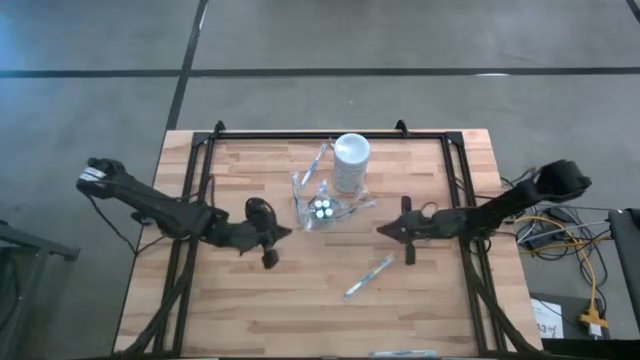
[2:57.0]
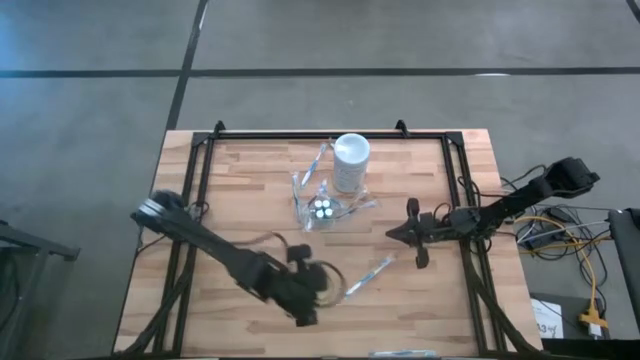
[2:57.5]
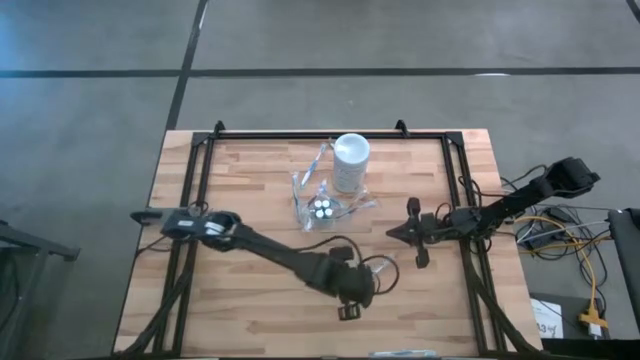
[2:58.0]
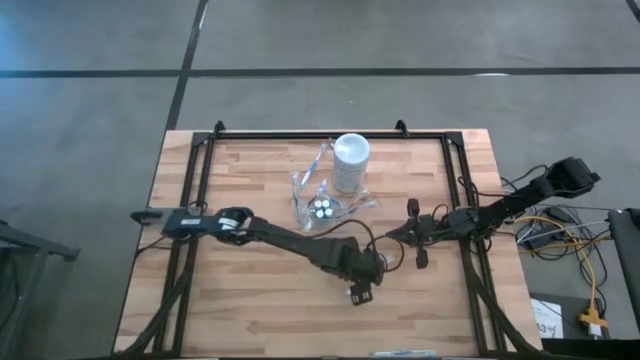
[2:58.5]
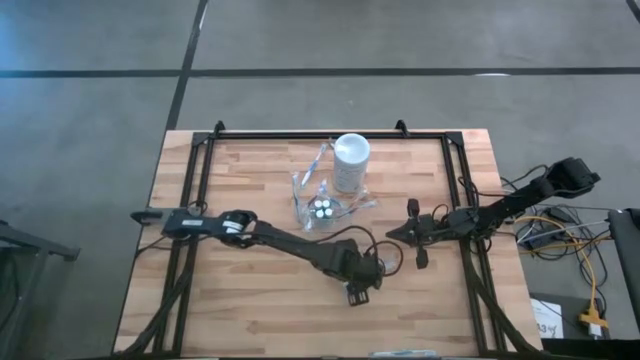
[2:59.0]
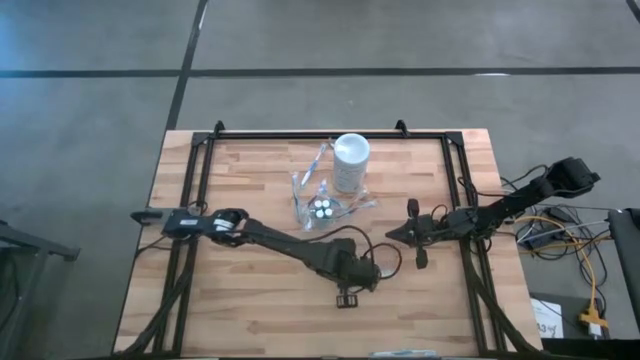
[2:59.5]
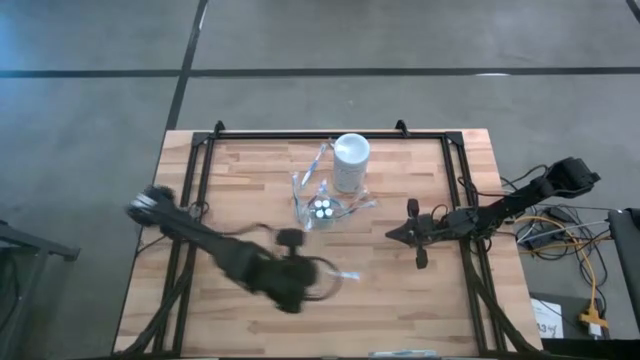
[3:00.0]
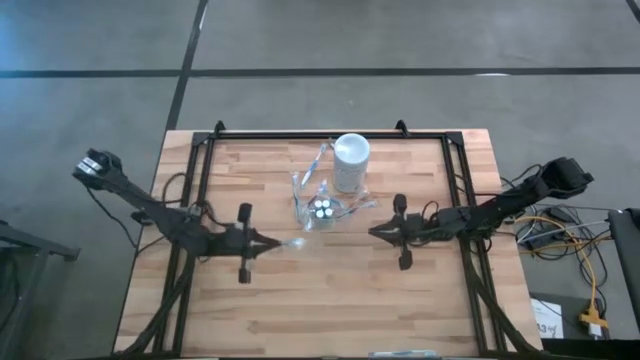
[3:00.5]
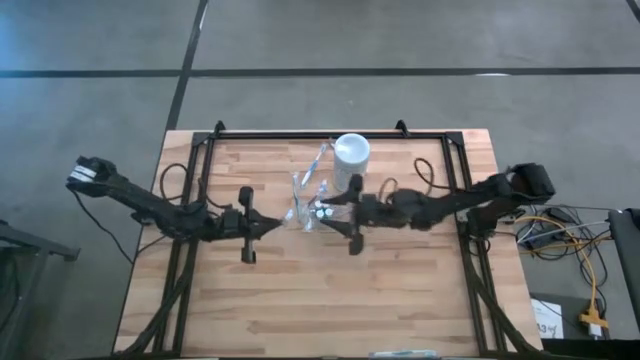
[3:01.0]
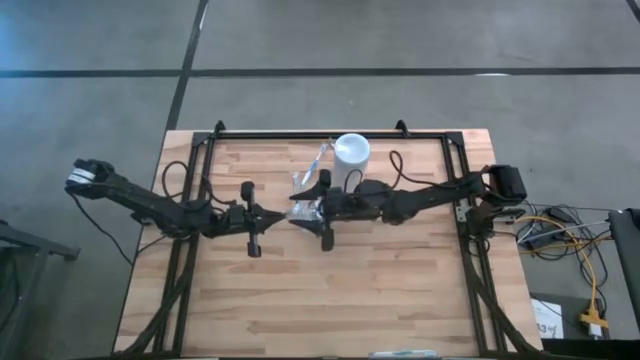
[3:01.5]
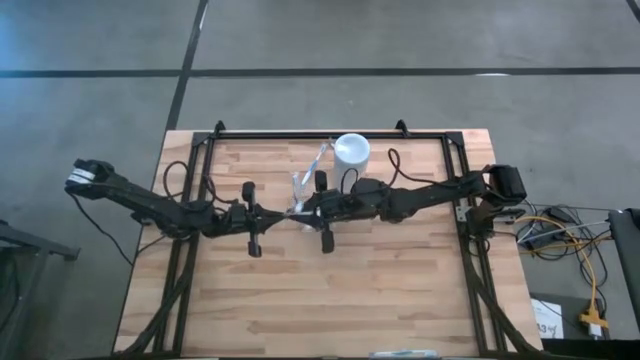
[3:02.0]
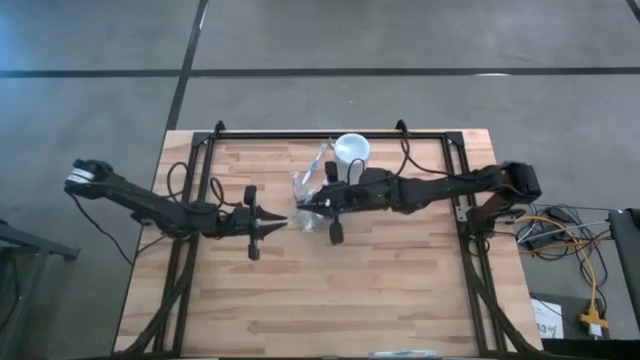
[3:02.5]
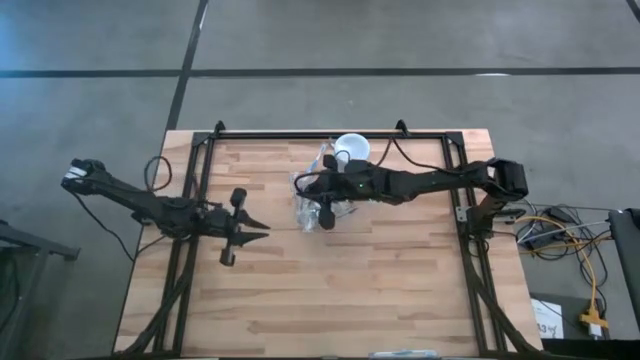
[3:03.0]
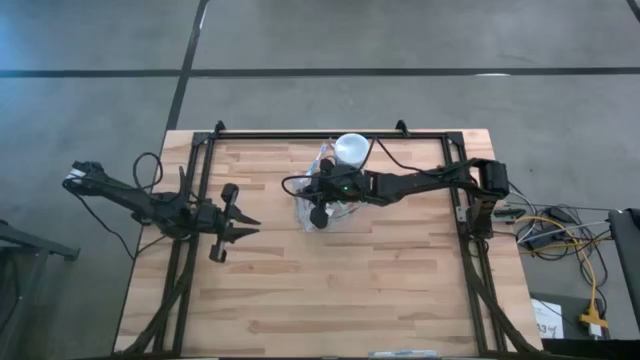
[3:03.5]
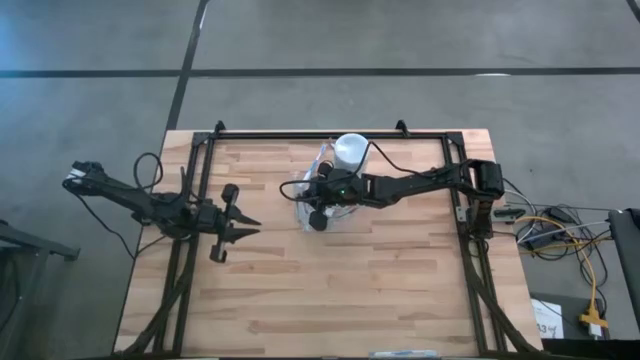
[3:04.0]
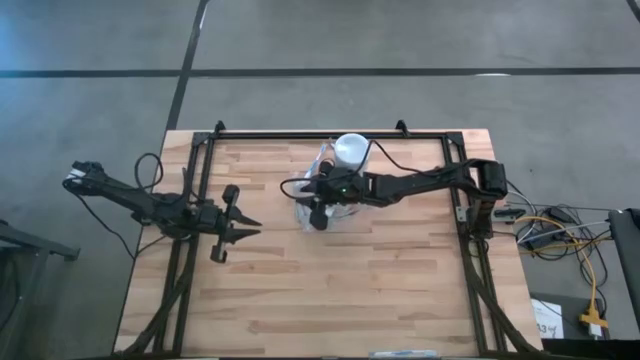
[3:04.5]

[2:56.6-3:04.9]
Task: Pick & Place toothbrushing station
Put the blue toothbrush into the transparent organizer

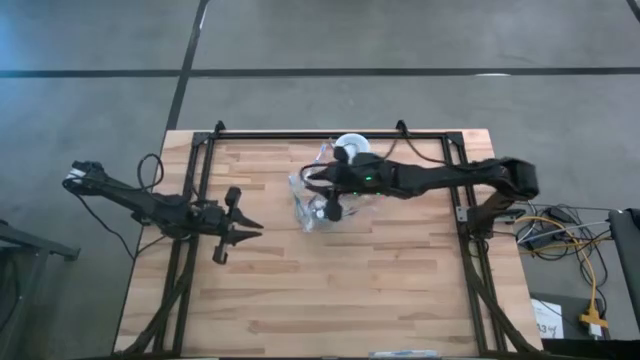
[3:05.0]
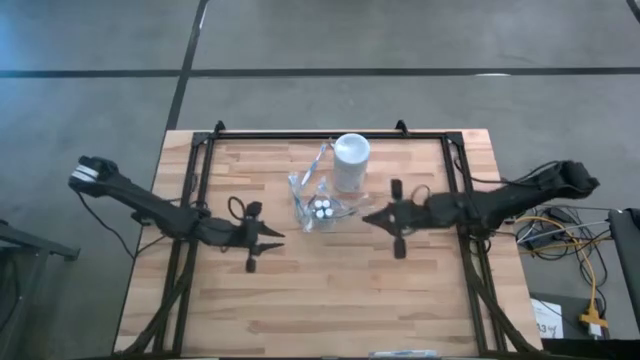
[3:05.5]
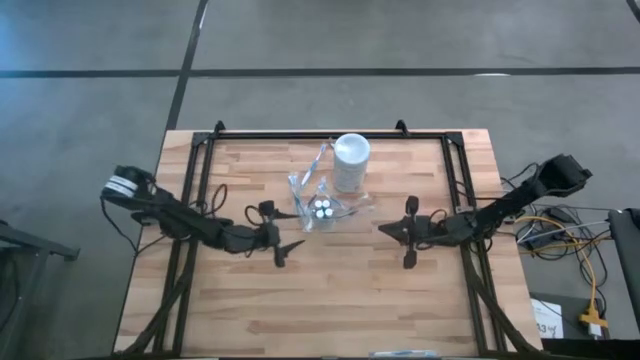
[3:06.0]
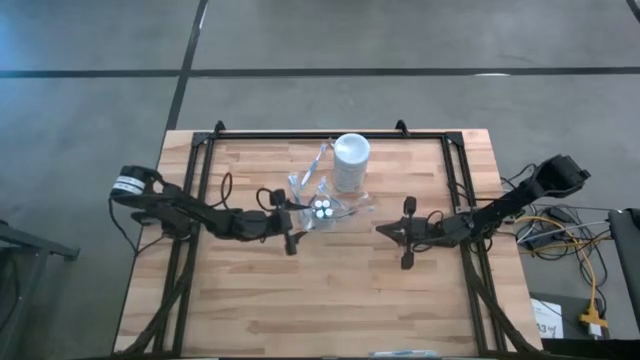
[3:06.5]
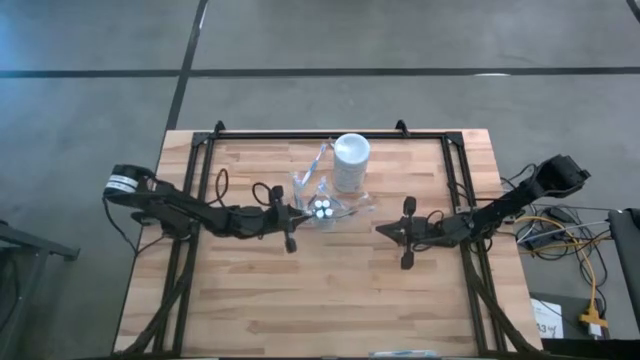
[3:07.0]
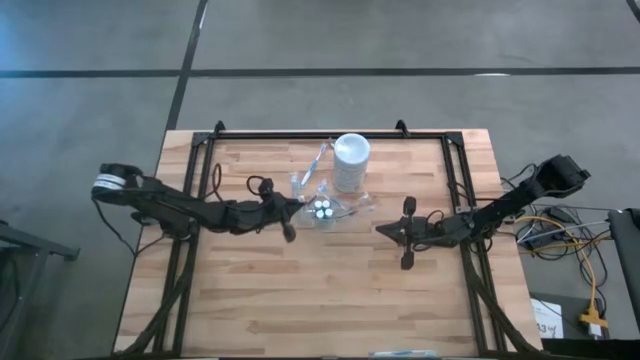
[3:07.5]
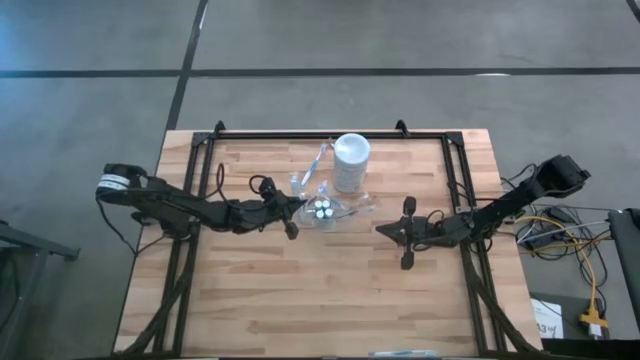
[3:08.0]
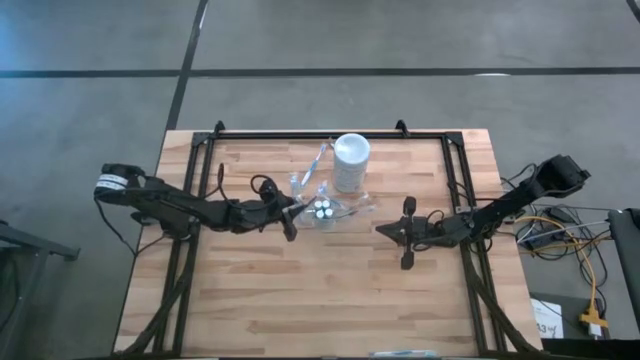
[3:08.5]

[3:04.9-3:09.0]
Adjust the blue toothbrush in the transparent organizer
